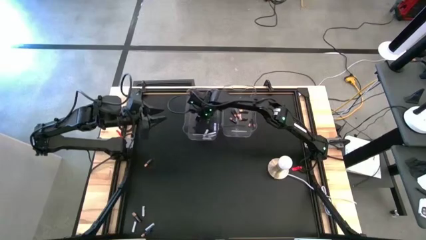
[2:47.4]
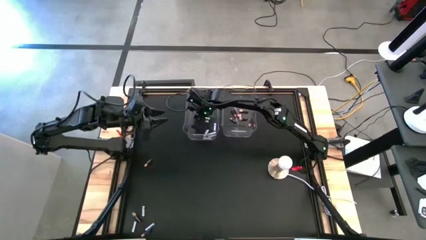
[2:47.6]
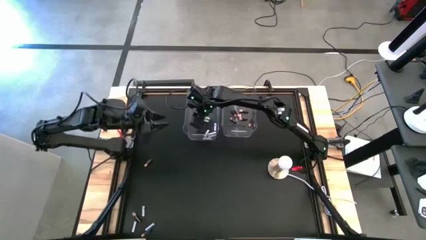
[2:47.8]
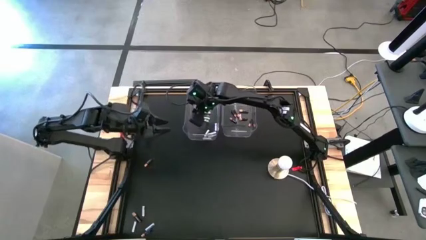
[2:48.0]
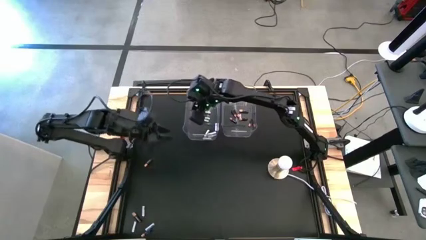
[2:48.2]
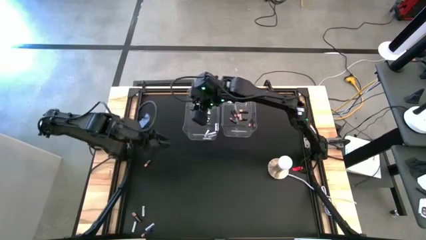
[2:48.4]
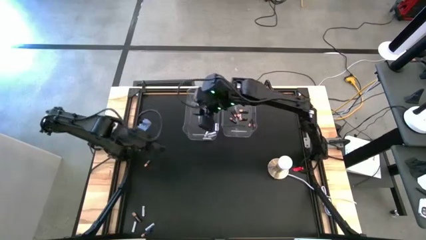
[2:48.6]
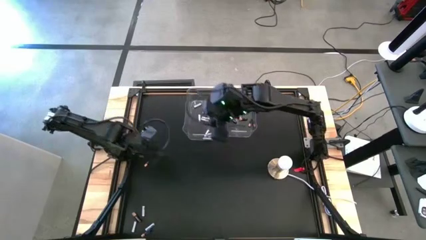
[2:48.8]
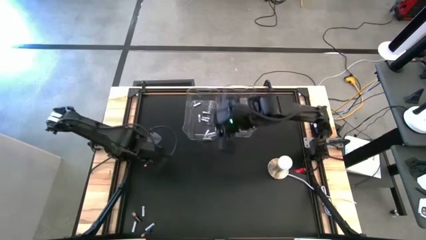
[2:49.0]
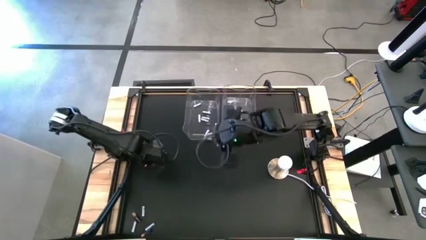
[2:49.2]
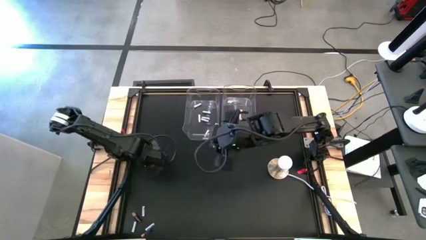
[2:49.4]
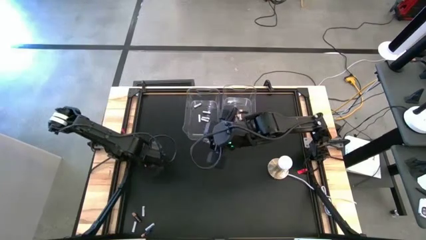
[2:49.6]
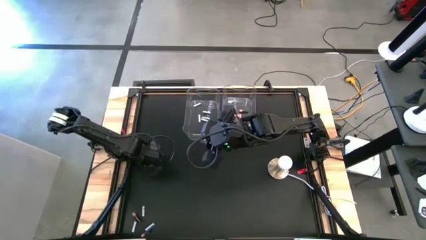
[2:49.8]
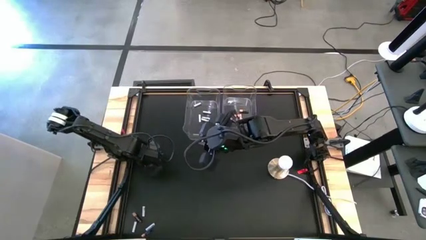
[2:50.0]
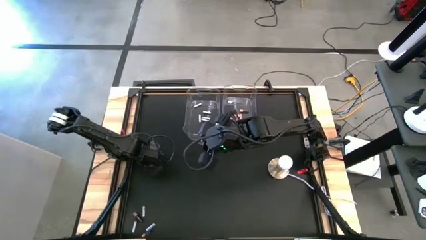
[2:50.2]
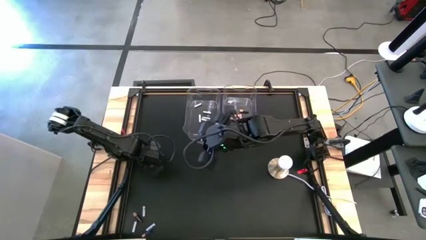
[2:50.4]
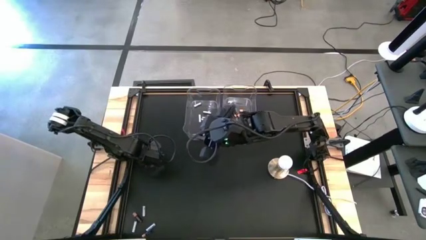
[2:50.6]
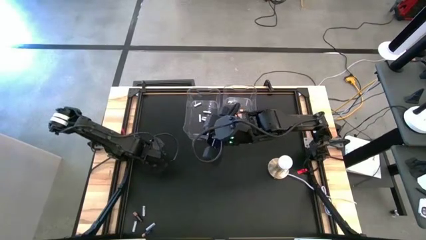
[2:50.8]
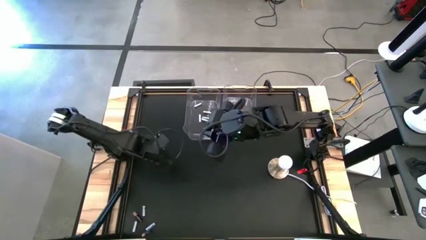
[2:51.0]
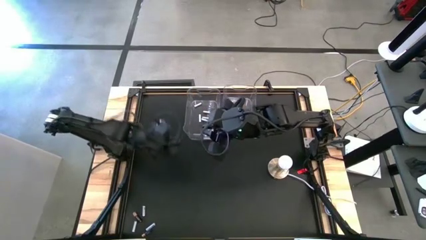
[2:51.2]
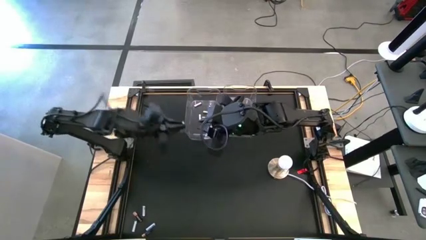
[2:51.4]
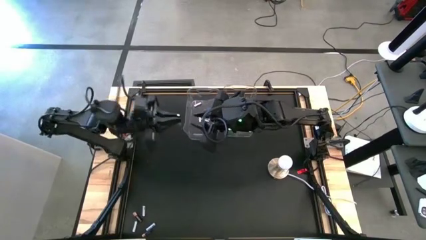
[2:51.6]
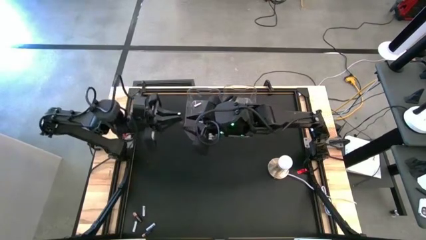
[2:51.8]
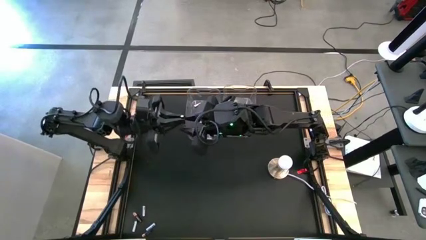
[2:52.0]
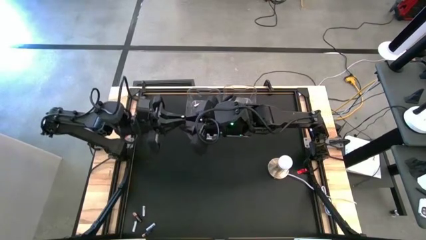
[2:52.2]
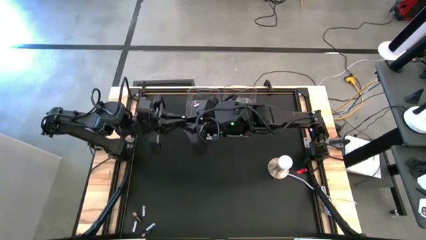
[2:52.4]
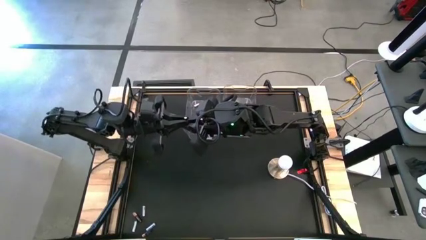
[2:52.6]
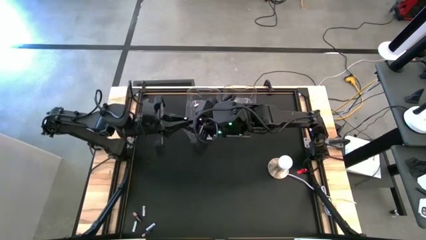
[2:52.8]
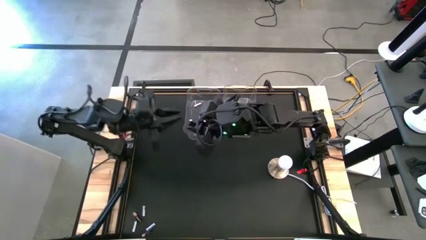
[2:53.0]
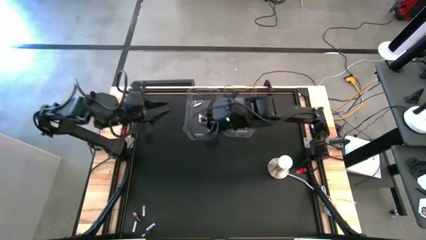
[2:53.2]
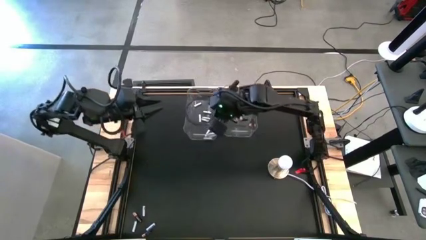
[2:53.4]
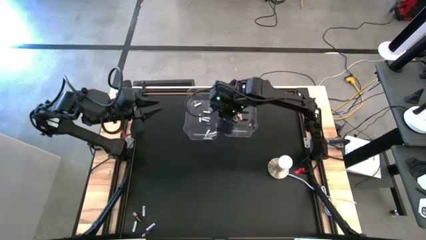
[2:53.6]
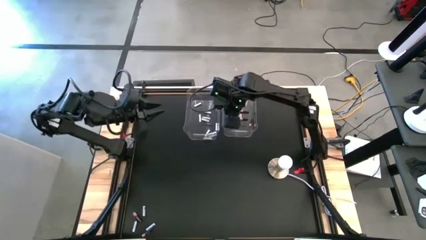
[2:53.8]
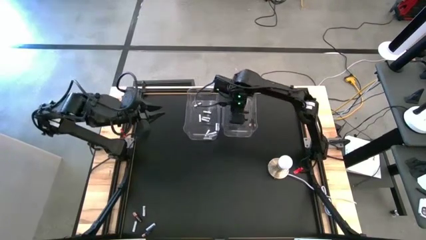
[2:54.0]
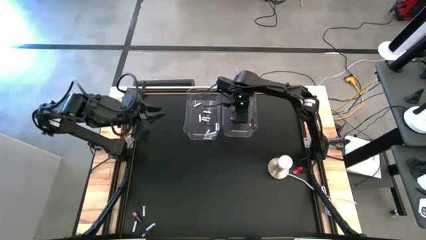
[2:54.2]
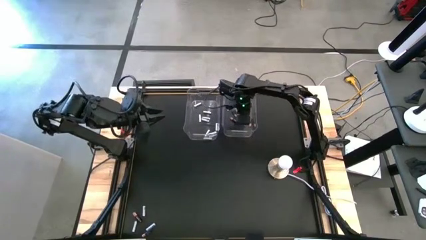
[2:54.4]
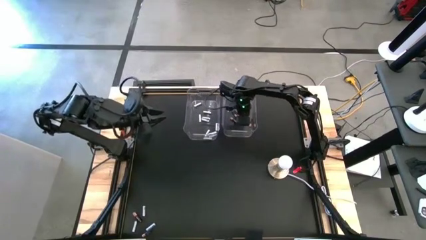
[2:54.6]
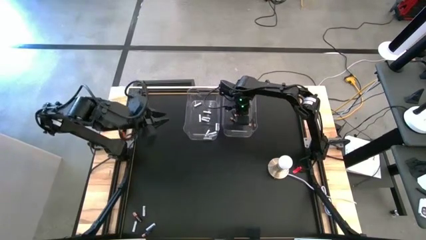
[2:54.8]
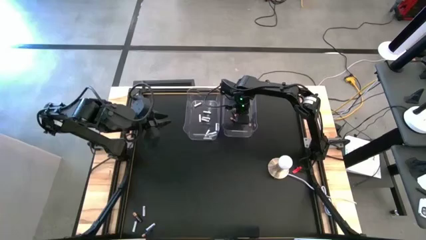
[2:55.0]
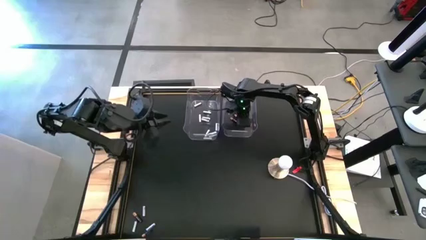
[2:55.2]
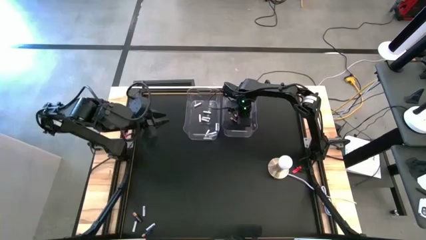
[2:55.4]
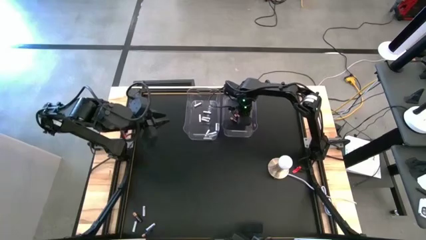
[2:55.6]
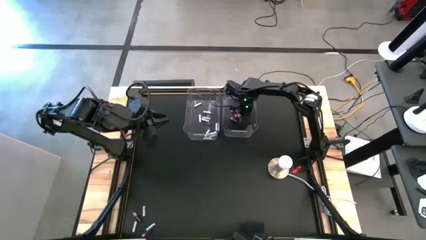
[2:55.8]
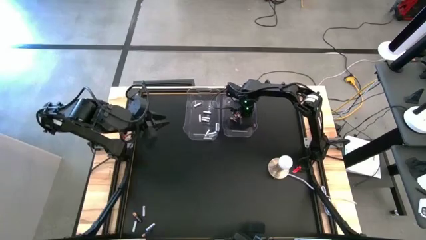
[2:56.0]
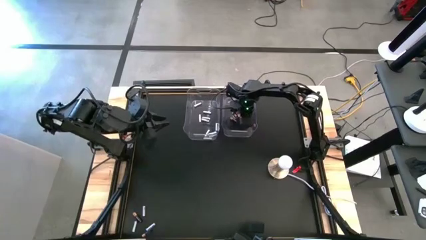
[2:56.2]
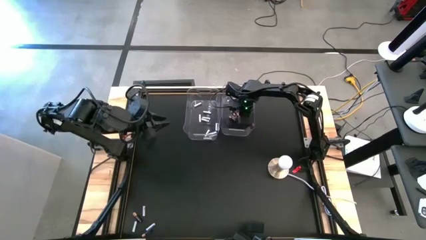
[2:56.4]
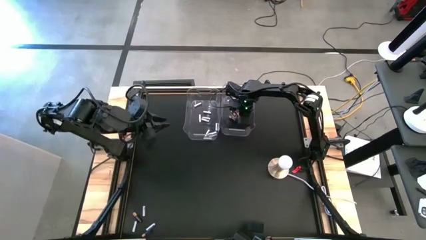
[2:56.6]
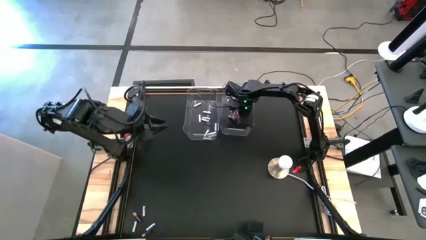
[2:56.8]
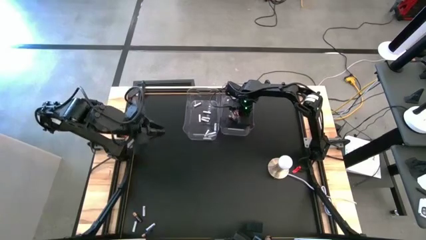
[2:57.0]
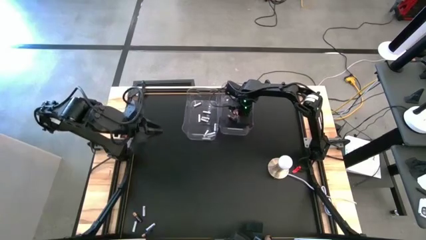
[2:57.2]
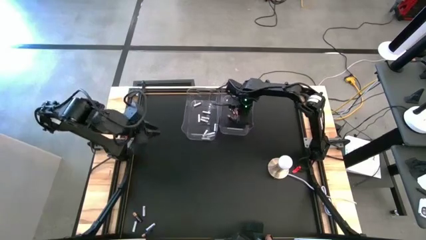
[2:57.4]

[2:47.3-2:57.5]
Task: Sort batteries
Put the black battery into the right transparent bin

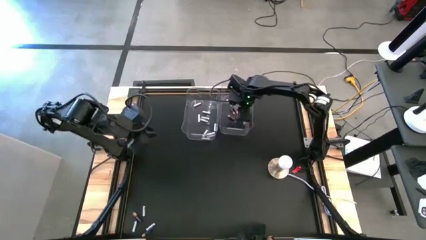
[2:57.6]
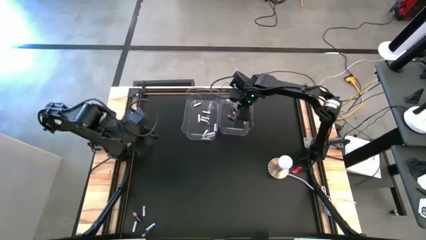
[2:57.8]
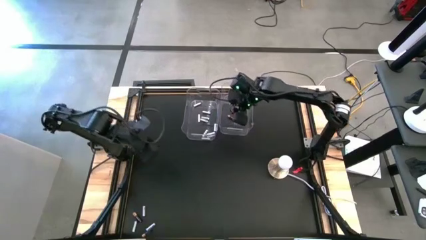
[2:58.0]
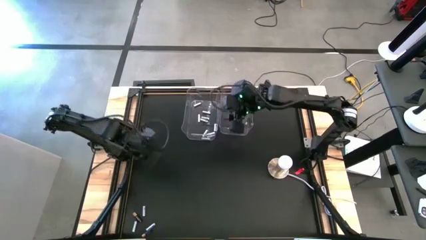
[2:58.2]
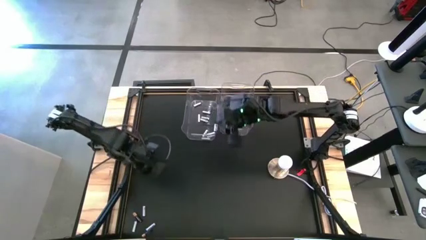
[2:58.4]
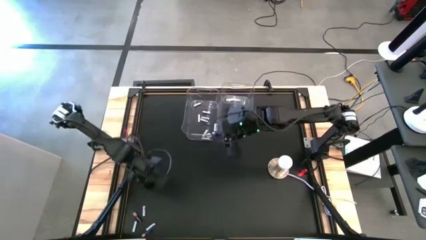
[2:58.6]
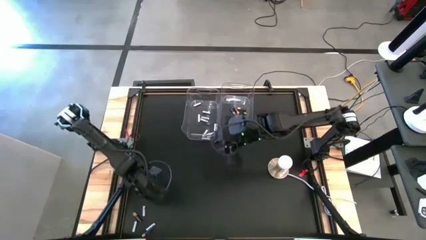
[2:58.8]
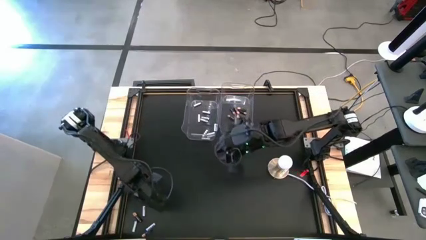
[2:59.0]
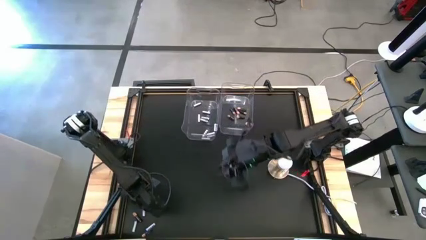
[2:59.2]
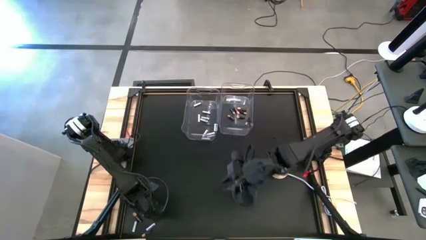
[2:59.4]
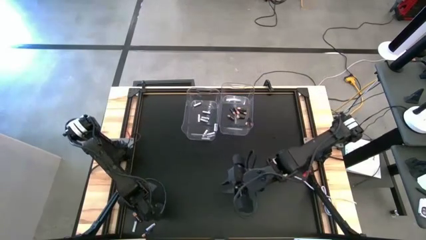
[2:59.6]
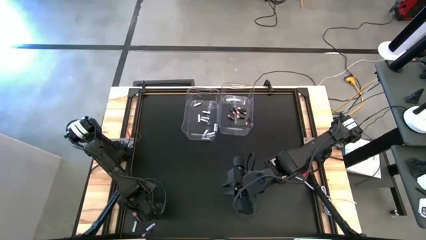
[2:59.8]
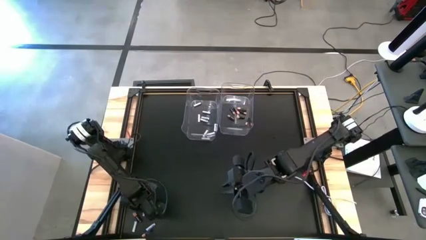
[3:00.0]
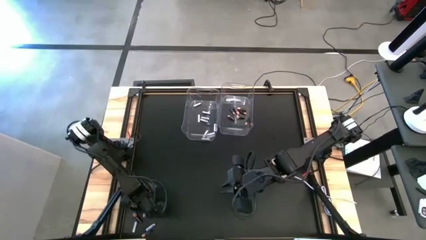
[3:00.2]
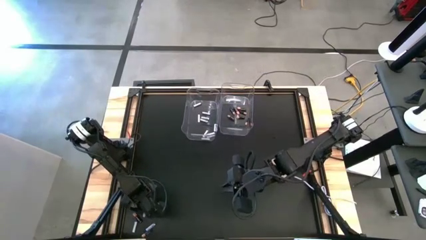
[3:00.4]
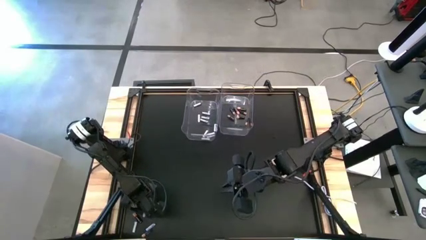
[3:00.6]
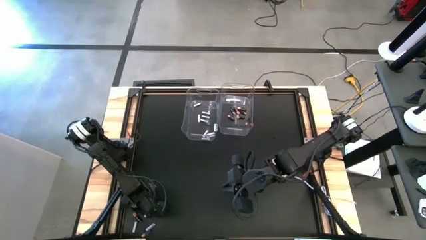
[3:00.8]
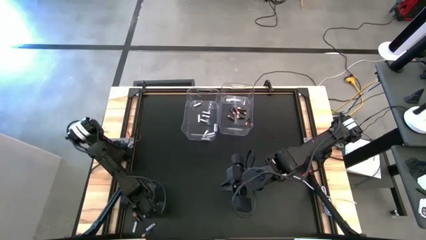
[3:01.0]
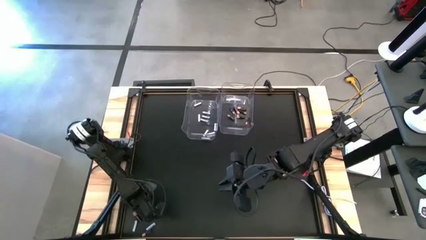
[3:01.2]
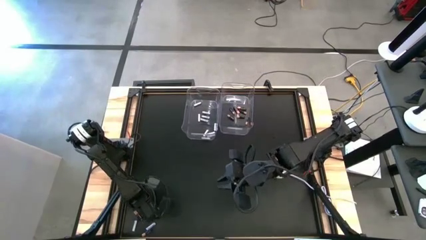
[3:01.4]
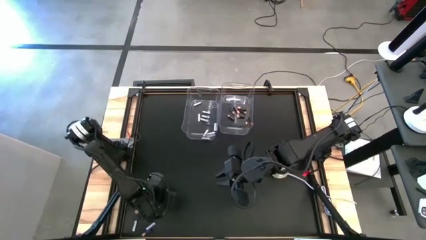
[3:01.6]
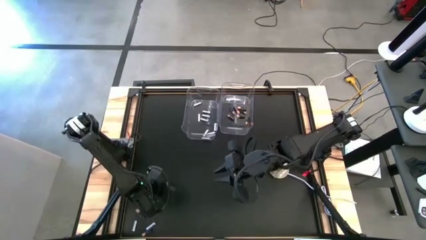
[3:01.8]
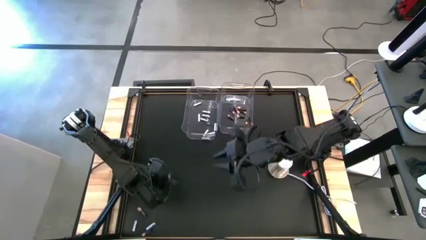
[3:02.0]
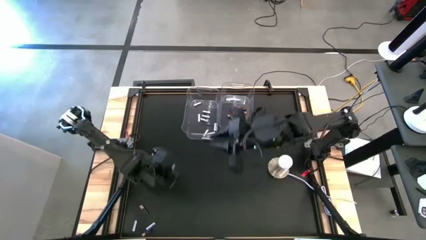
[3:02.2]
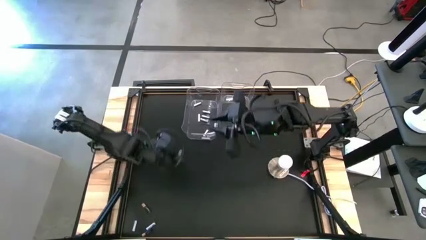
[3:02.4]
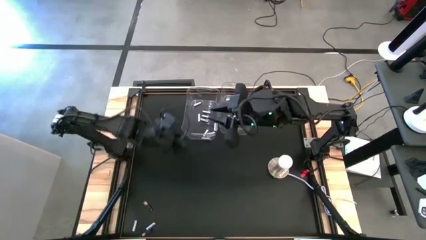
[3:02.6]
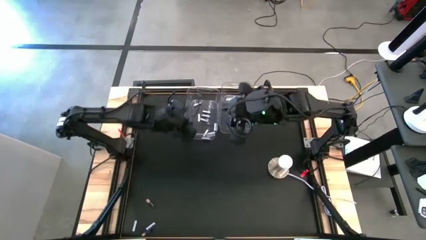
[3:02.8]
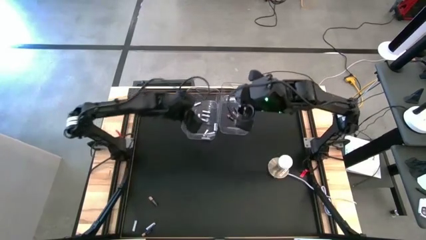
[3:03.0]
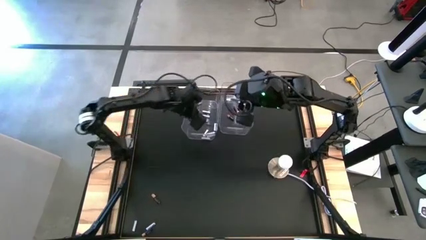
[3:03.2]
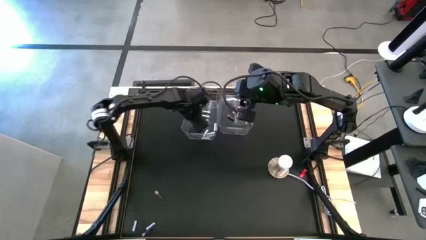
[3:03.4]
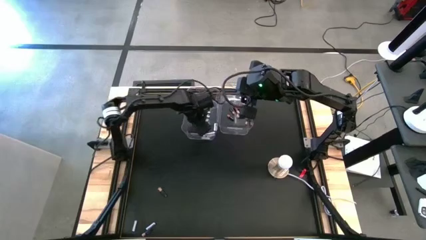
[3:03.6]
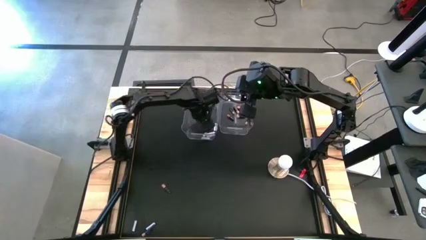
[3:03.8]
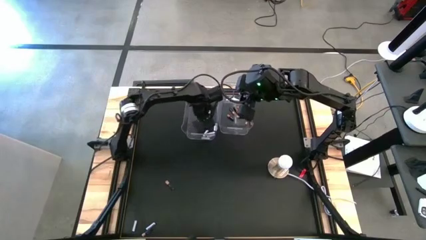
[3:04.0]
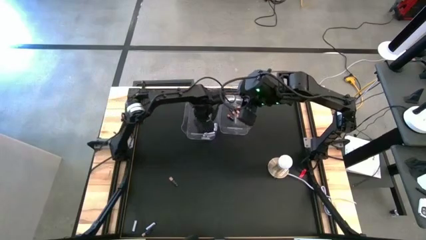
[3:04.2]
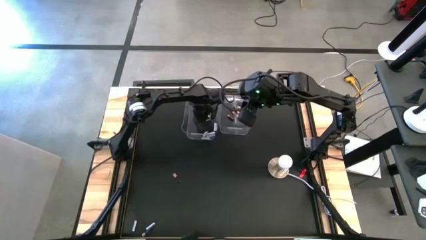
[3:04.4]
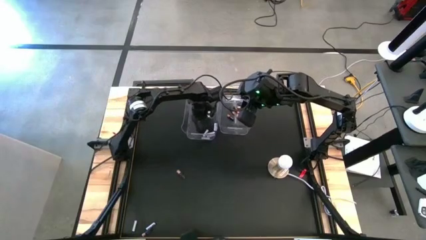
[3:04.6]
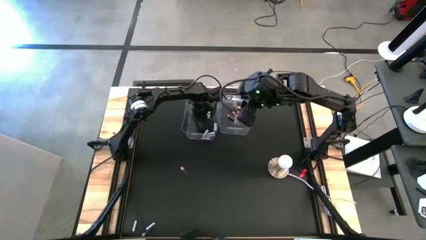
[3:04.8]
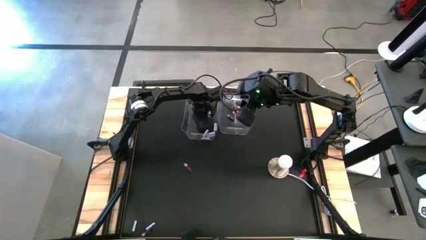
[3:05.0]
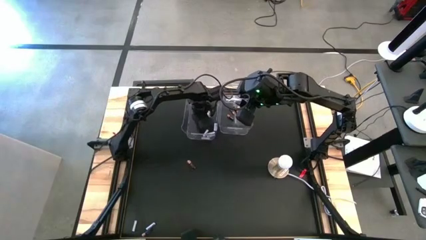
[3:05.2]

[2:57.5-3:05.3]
Put the white battery into the left transparent bin
